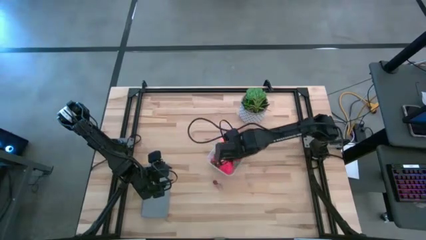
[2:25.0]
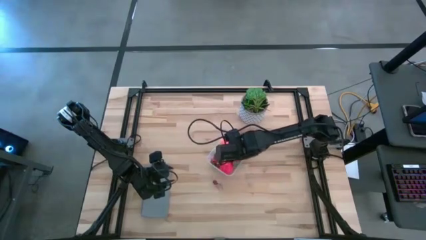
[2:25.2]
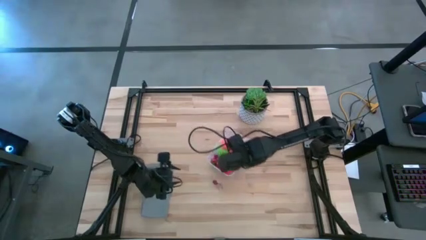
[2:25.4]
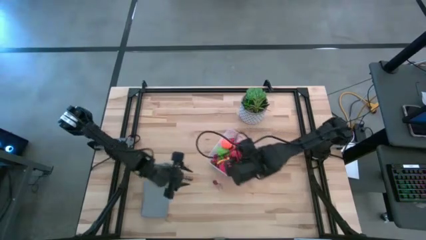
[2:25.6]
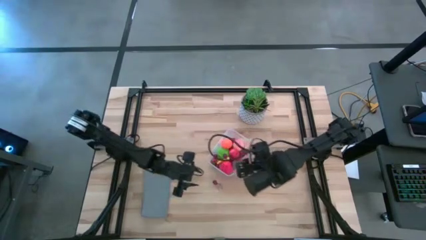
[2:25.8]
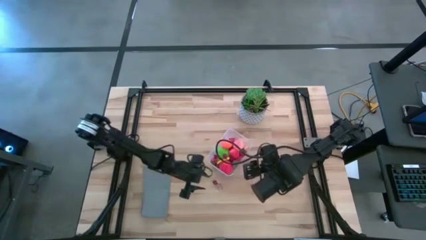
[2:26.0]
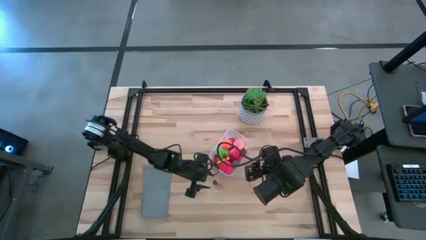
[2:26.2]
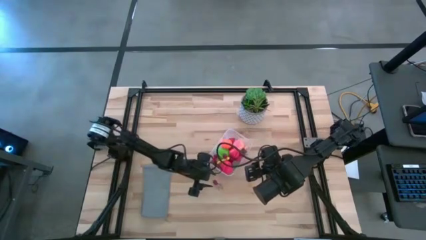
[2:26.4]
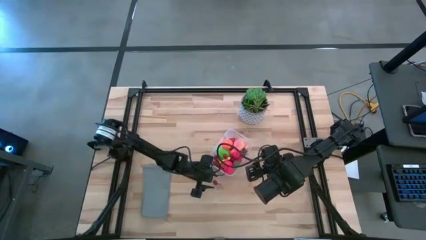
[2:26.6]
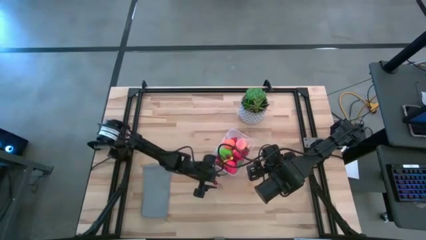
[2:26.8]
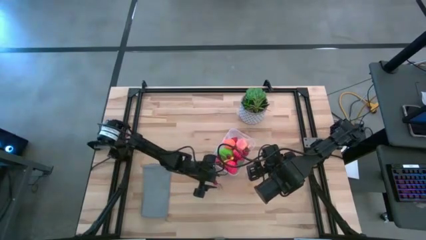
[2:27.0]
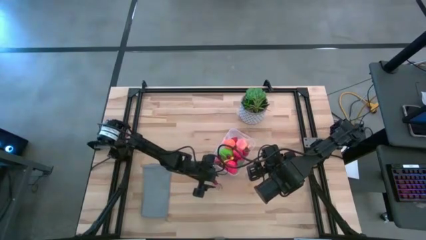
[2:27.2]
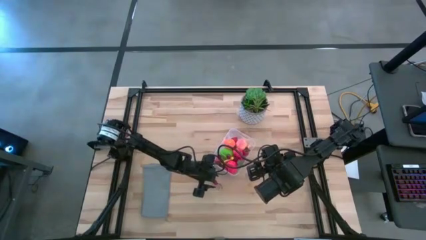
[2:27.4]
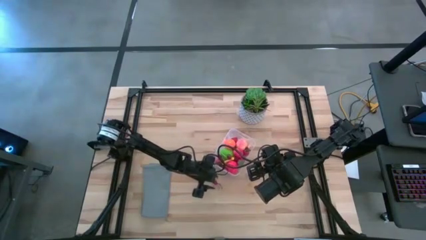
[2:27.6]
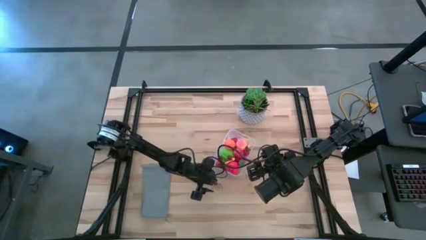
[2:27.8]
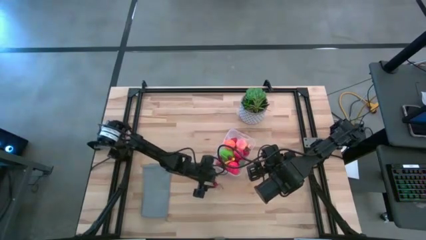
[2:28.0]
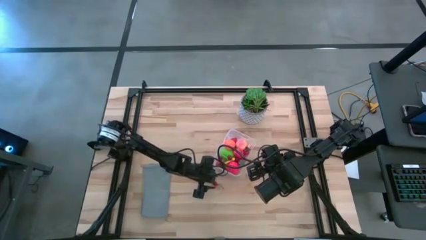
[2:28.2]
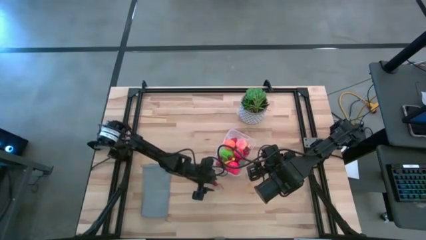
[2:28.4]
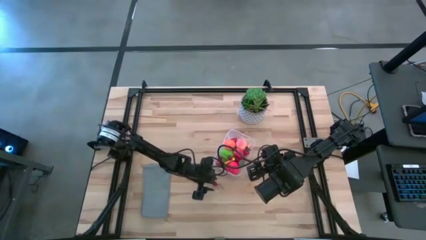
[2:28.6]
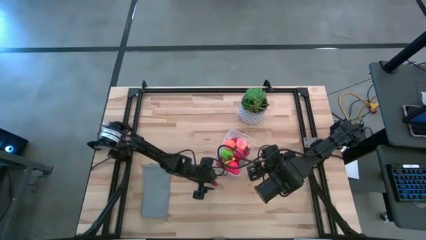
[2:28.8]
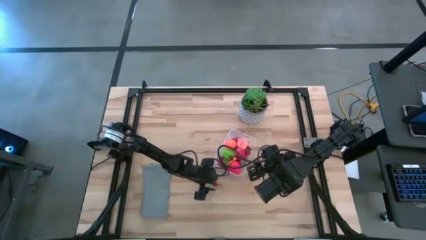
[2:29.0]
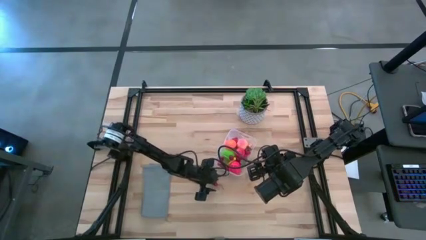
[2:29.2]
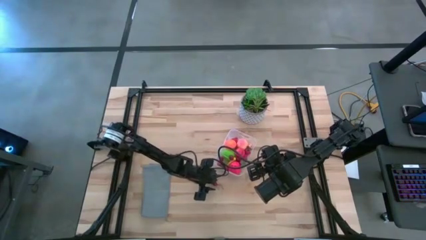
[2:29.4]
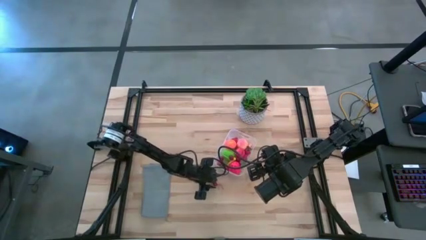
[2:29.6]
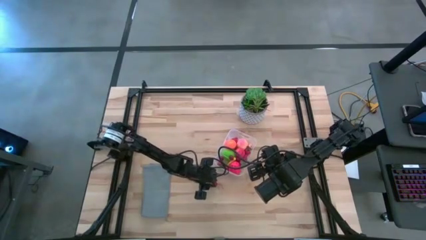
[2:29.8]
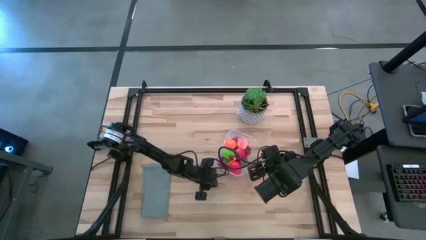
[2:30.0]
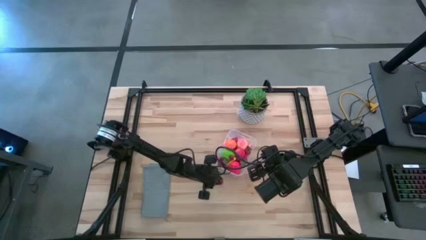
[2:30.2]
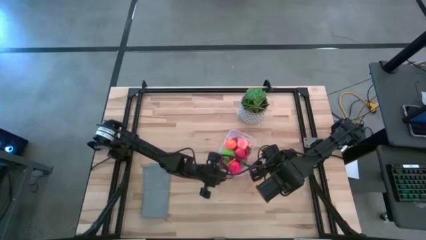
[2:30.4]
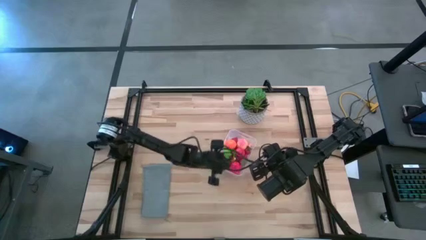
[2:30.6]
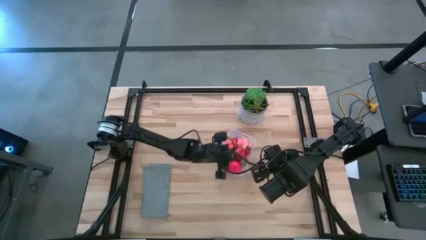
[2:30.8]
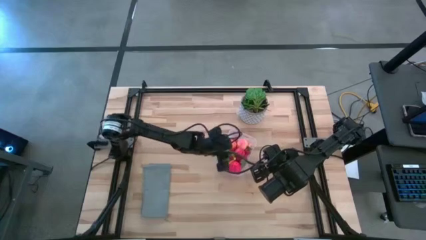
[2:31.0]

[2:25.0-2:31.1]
Task: Pick and placing Produce into tupperware
Put the red cherry into the transparent bin

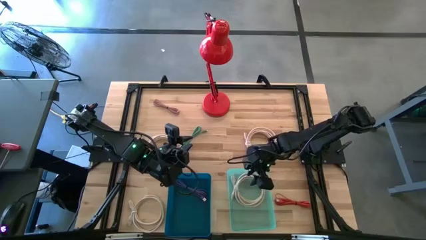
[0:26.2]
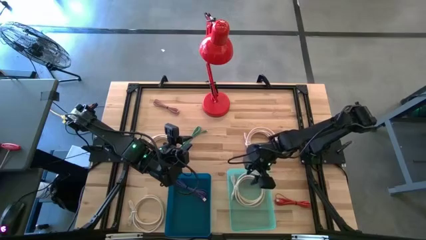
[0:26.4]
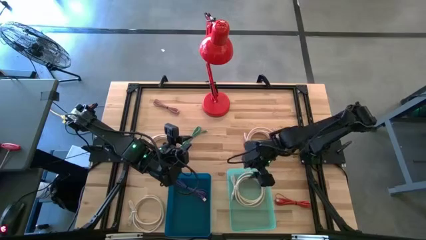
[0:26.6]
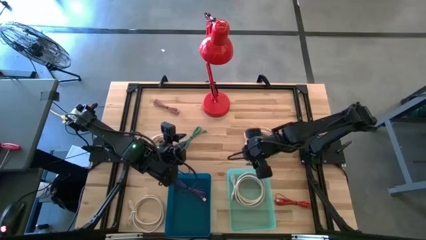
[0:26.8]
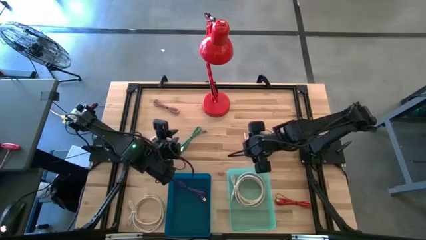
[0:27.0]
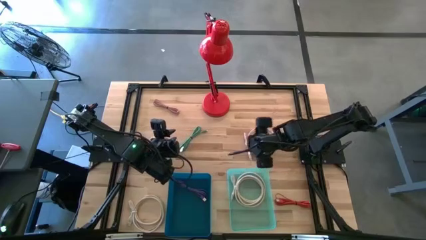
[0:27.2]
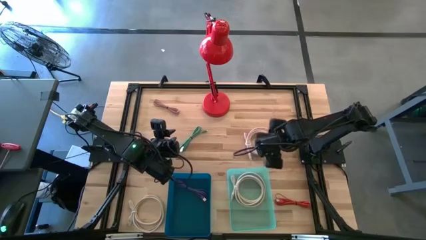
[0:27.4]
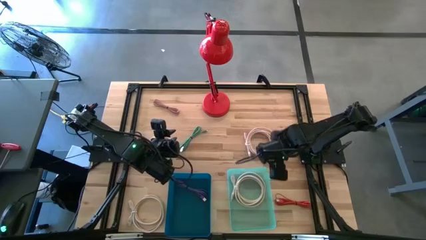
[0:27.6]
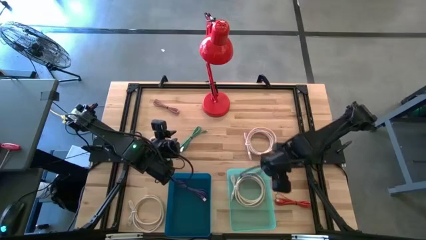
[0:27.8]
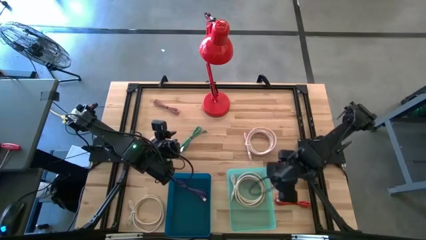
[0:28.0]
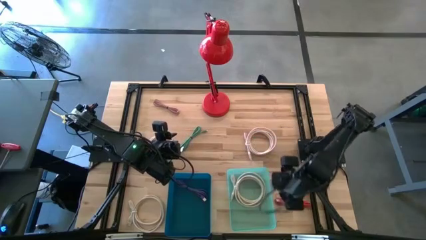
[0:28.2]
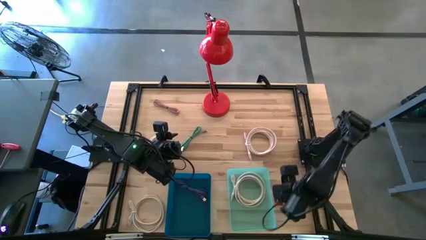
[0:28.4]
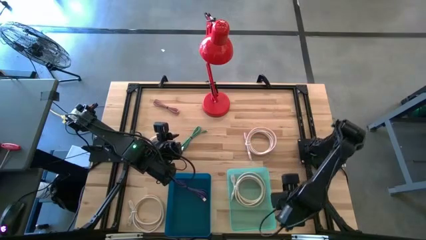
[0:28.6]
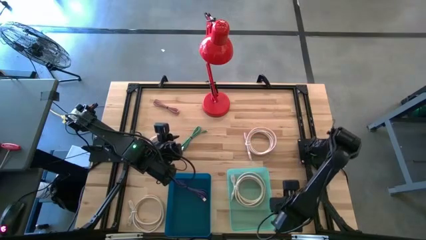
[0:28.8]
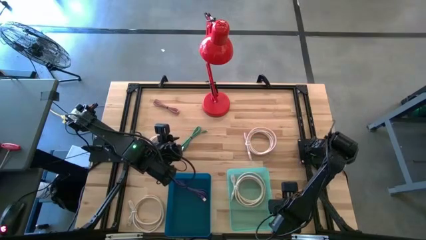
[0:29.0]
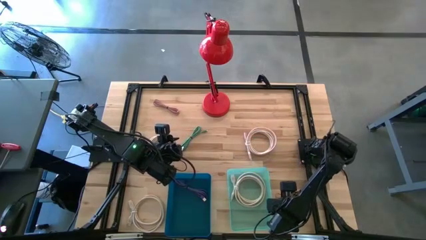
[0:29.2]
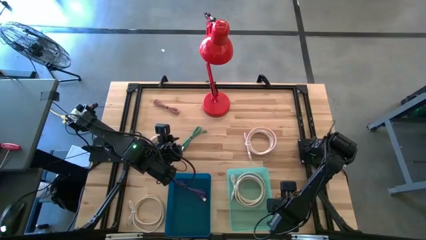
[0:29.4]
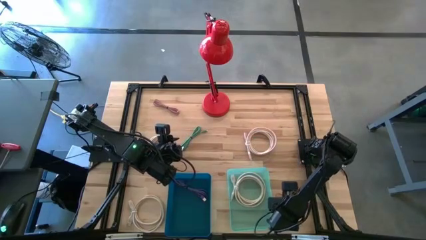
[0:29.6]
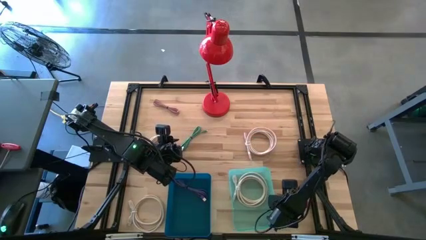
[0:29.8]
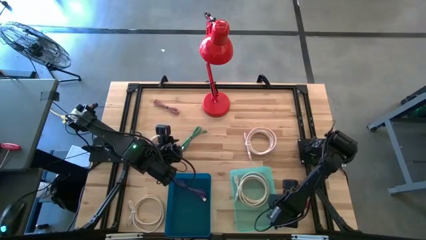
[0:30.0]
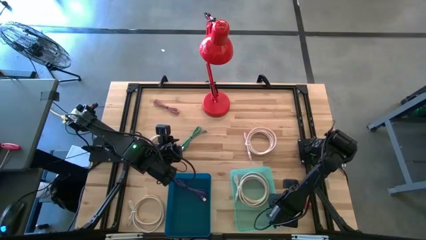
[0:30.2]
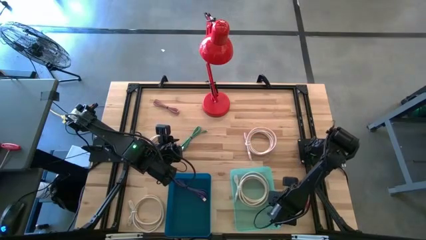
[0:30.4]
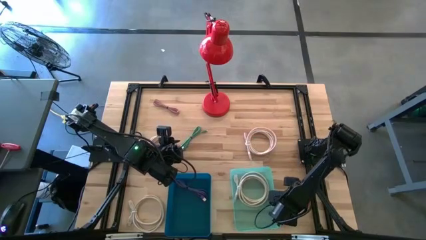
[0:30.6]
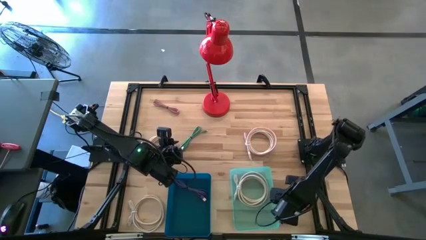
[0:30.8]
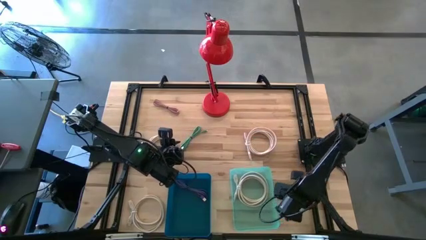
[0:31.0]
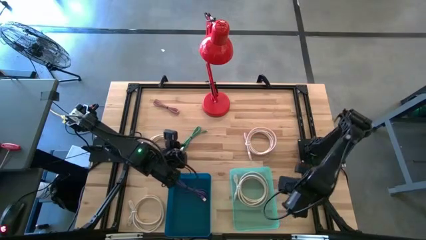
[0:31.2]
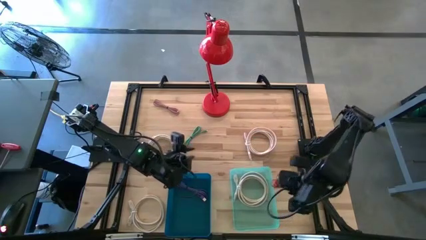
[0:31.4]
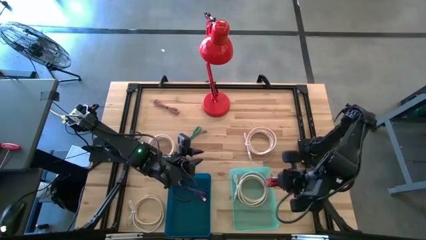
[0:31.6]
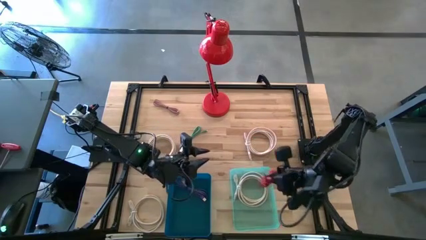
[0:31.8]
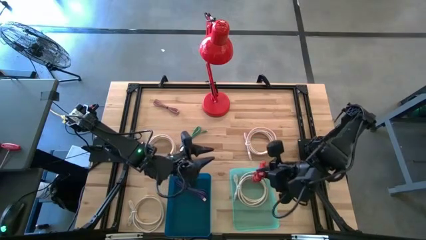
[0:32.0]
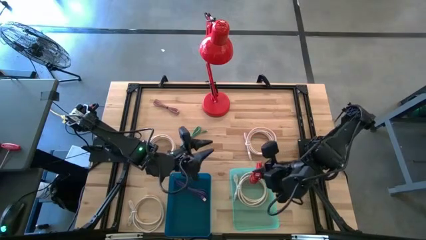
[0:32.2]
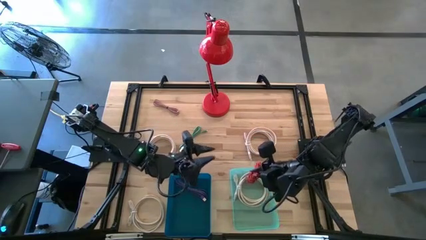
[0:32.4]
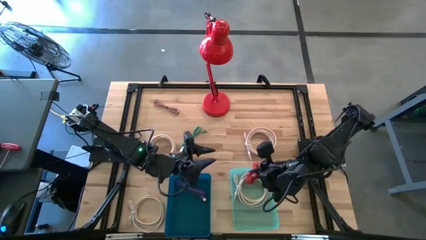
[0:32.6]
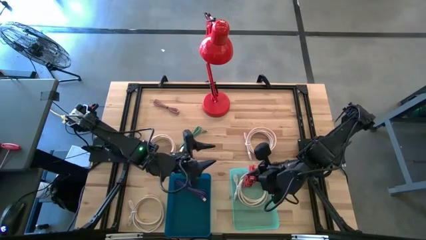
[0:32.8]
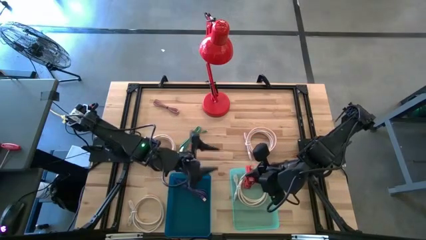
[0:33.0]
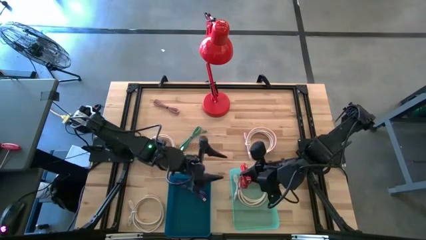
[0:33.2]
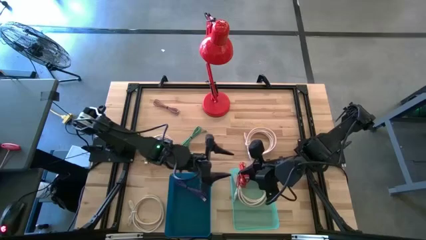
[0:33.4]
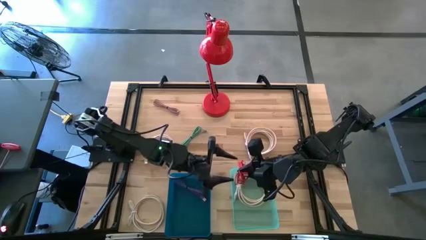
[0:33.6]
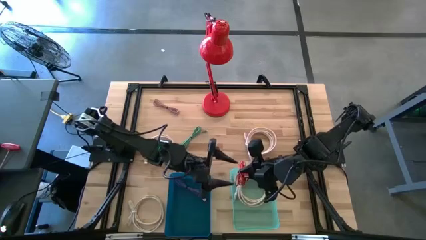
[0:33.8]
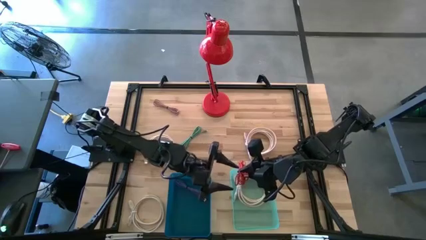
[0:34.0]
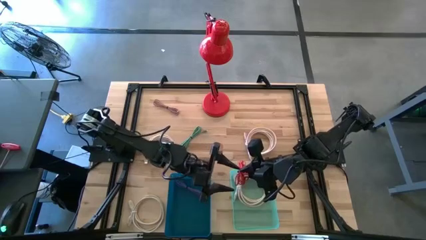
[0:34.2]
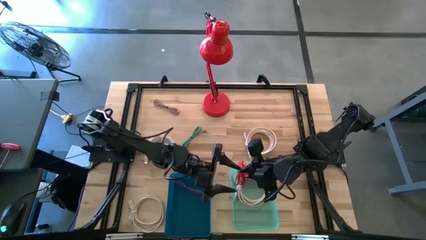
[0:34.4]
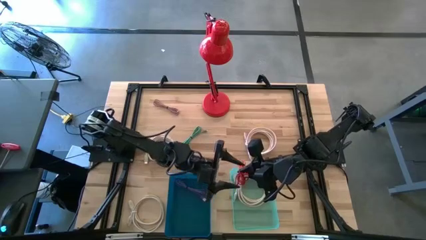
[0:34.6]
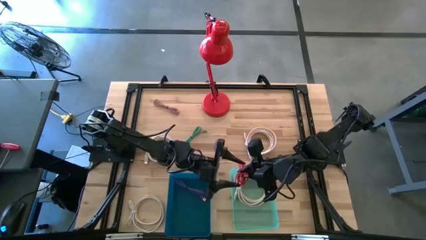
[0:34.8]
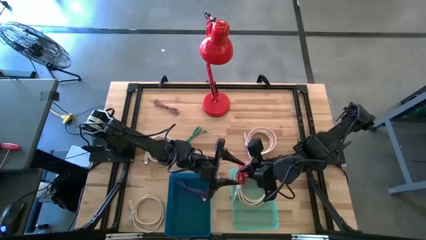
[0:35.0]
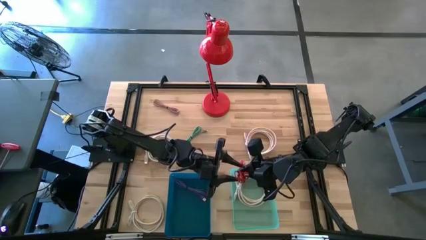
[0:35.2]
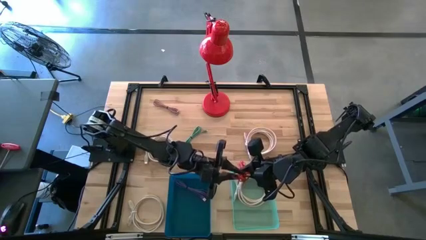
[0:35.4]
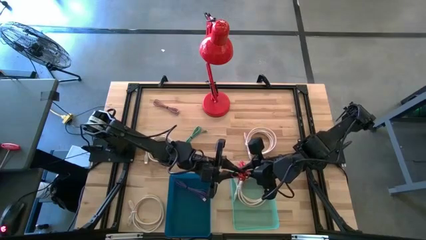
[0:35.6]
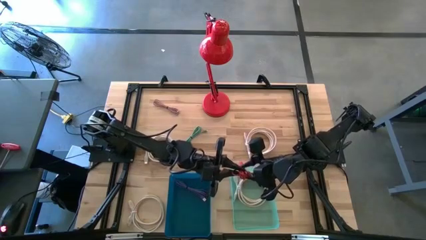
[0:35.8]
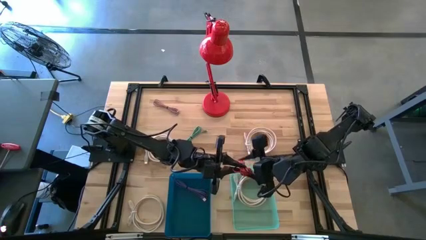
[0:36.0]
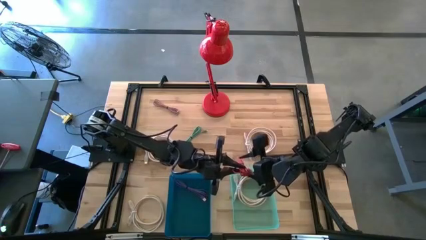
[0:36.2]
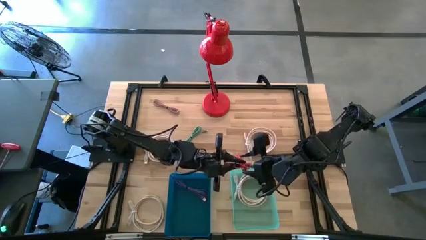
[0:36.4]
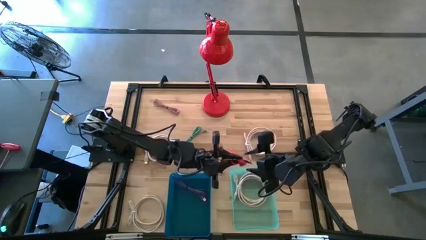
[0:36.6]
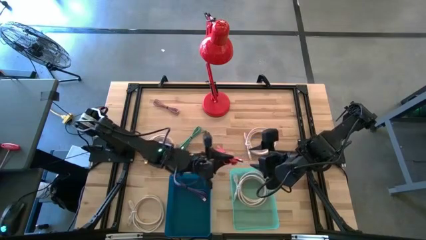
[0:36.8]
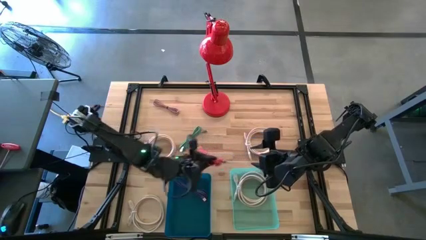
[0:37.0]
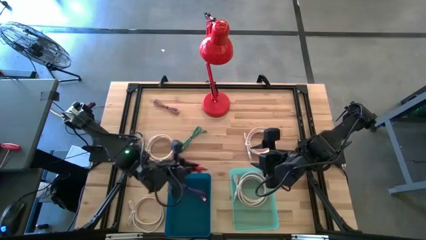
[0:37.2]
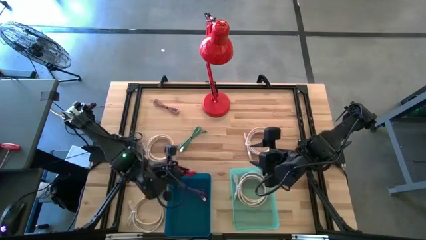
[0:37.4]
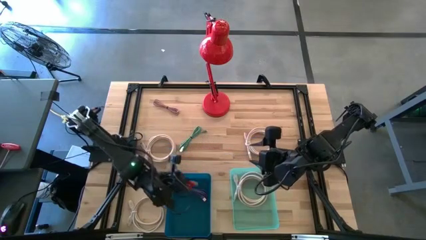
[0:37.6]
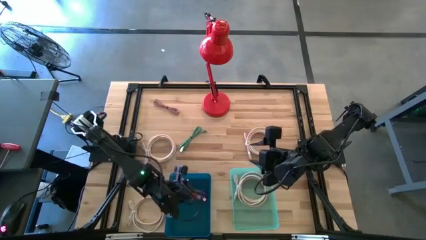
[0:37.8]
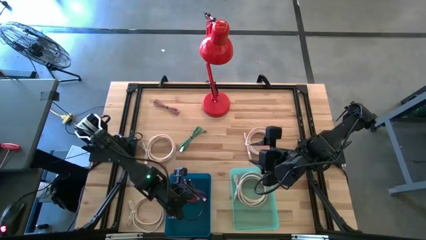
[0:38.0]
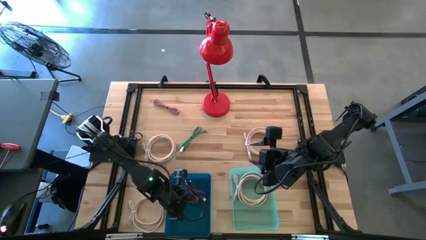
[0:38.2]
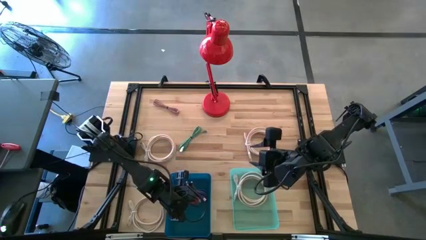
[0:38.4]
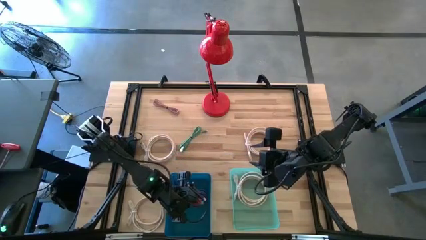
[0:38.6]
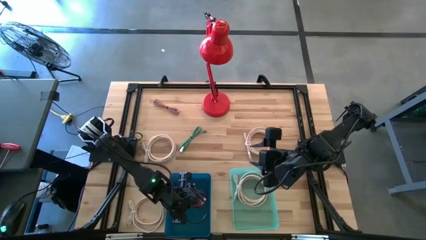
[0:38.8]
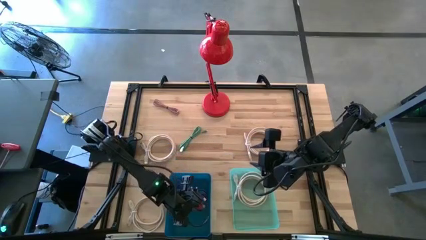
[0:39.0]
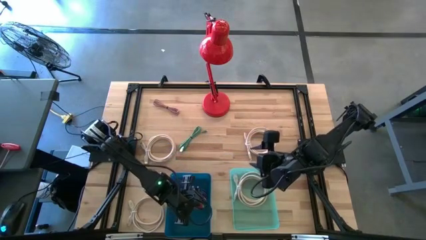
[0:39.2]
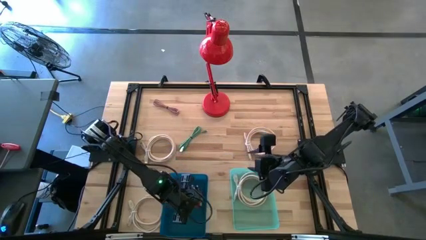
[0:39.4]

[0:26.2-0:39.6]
Task: Pick & Place USB Port
Put the orange charger cable into the blue bin
